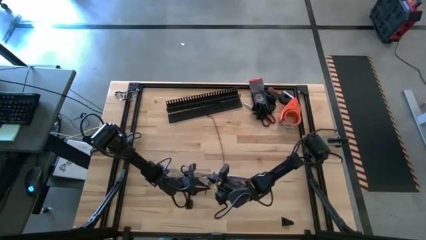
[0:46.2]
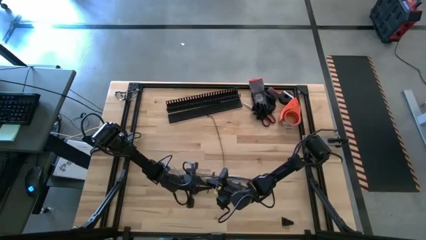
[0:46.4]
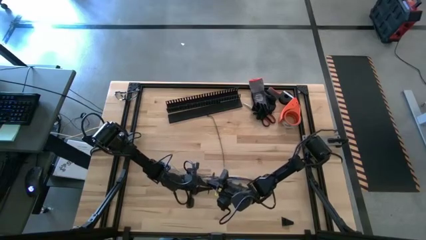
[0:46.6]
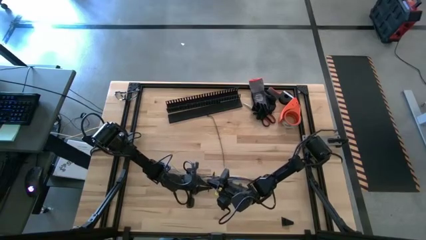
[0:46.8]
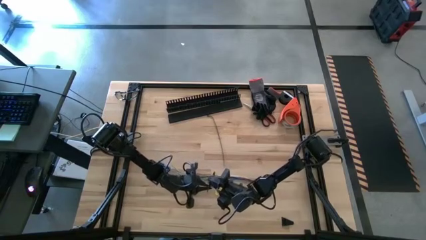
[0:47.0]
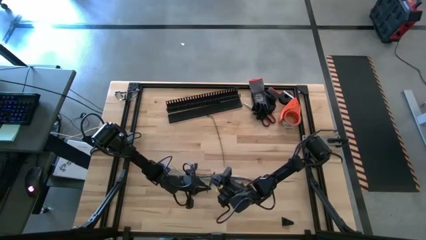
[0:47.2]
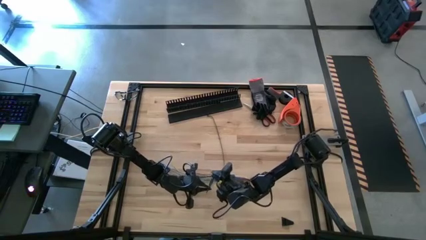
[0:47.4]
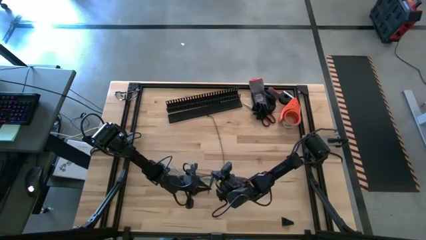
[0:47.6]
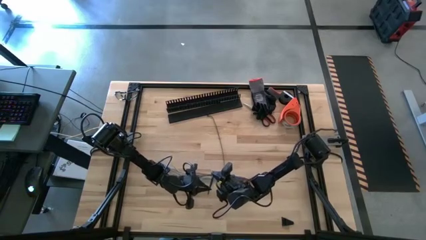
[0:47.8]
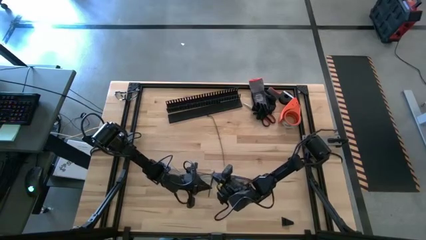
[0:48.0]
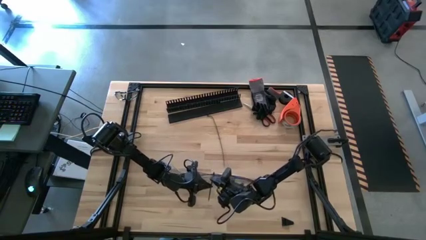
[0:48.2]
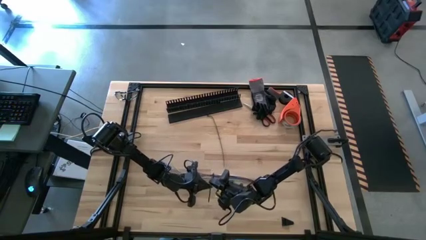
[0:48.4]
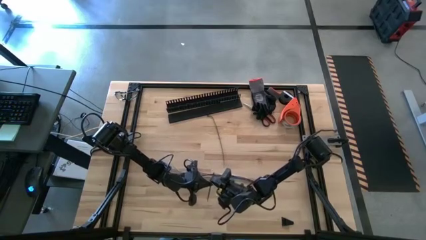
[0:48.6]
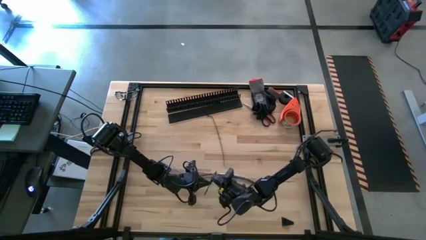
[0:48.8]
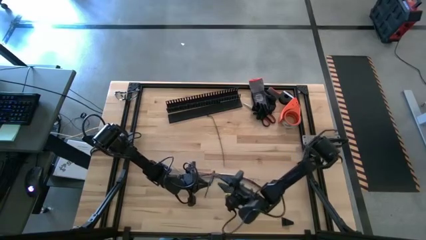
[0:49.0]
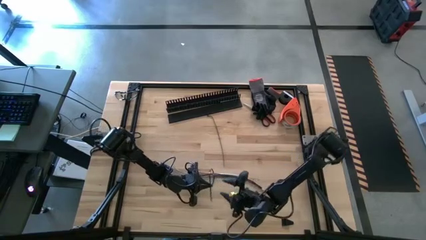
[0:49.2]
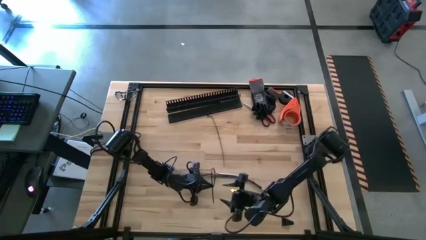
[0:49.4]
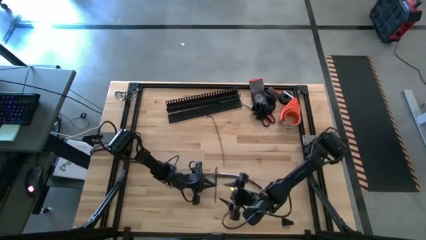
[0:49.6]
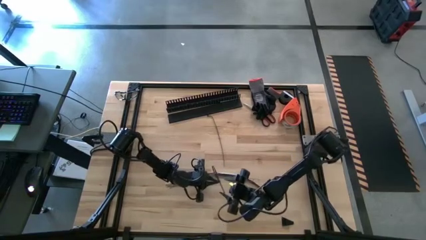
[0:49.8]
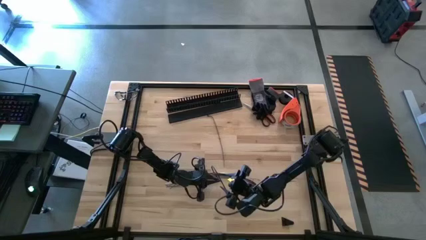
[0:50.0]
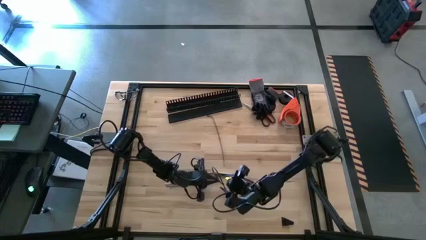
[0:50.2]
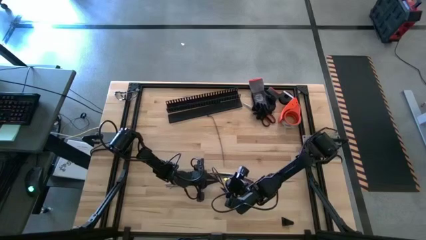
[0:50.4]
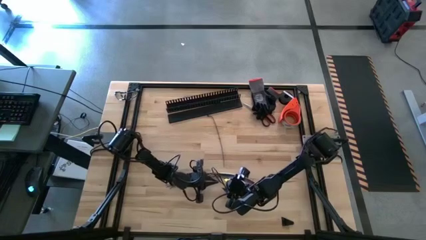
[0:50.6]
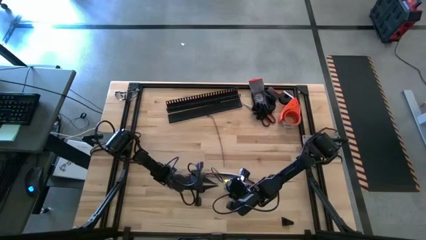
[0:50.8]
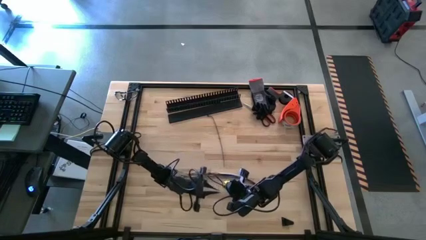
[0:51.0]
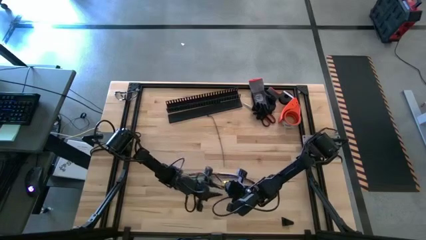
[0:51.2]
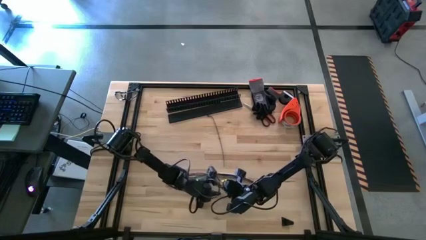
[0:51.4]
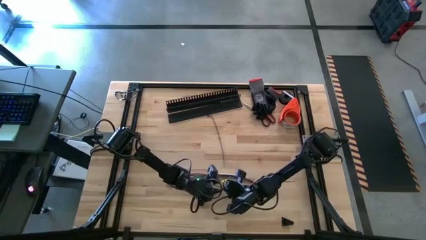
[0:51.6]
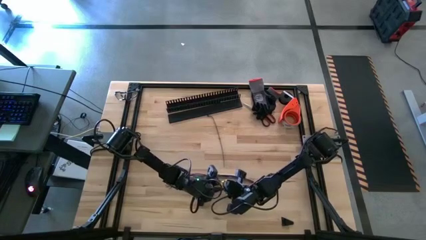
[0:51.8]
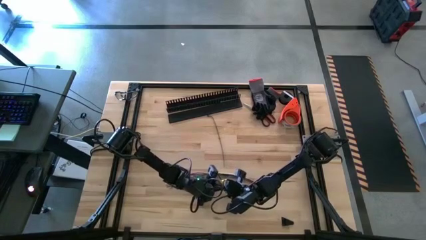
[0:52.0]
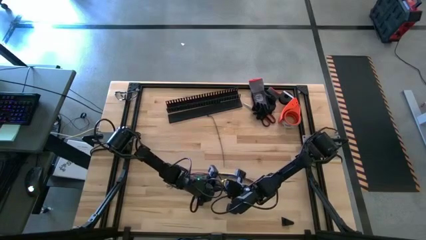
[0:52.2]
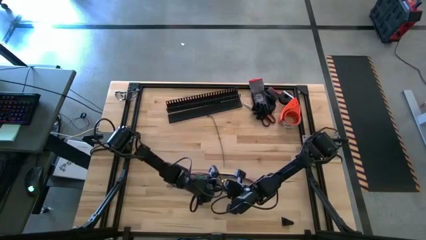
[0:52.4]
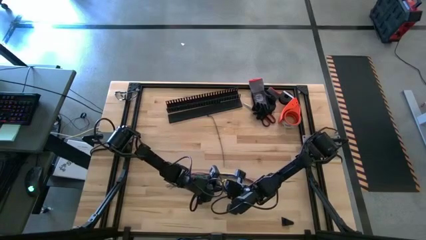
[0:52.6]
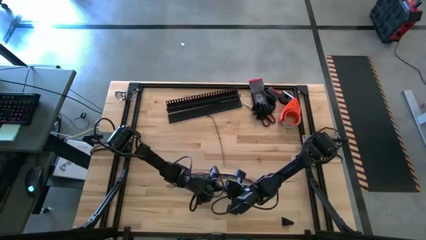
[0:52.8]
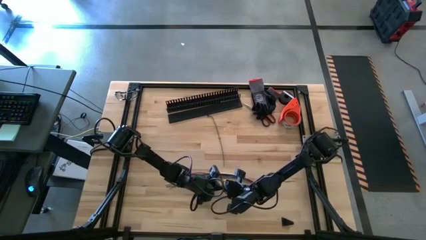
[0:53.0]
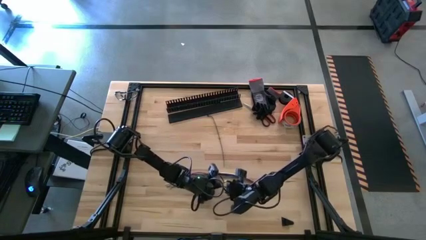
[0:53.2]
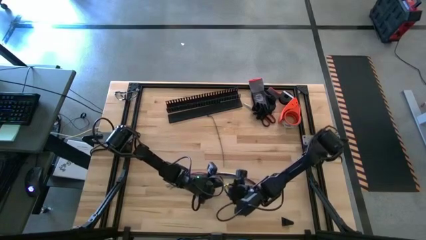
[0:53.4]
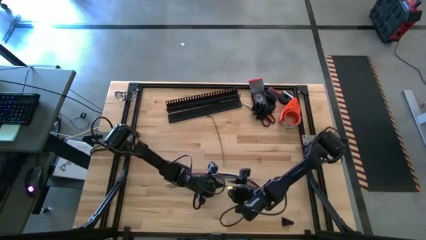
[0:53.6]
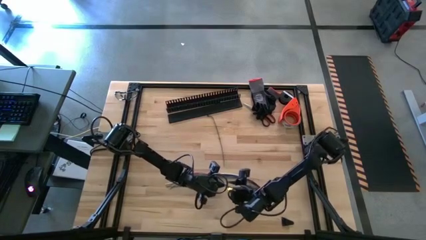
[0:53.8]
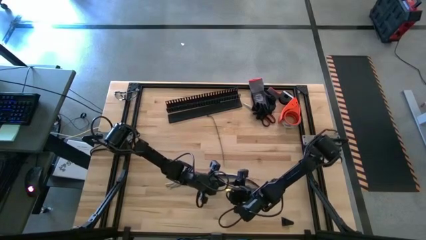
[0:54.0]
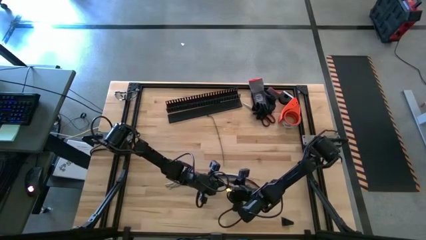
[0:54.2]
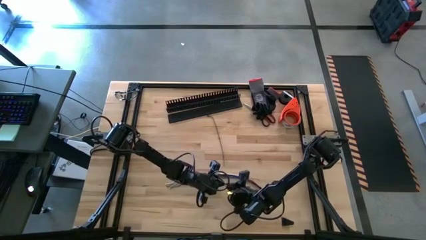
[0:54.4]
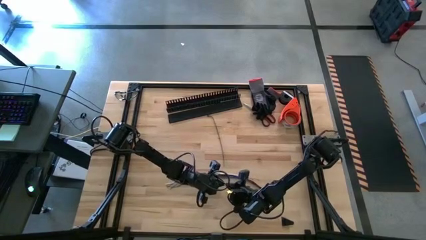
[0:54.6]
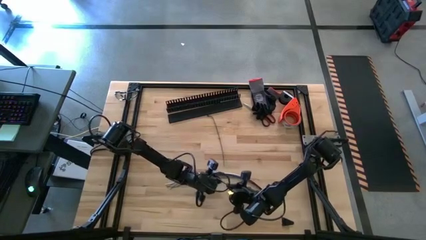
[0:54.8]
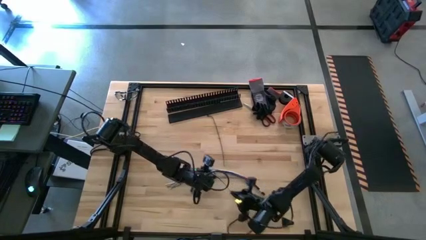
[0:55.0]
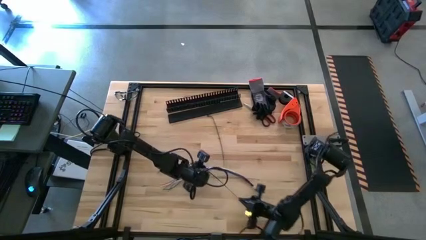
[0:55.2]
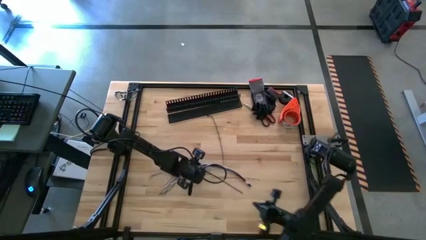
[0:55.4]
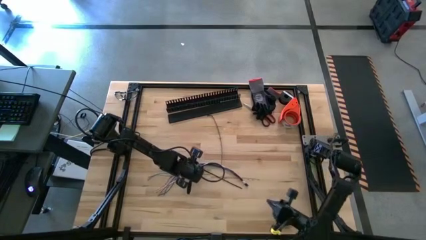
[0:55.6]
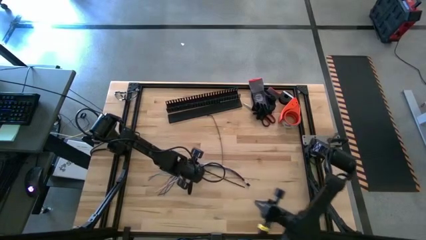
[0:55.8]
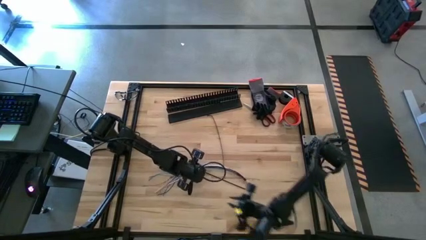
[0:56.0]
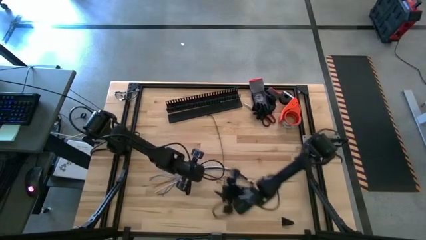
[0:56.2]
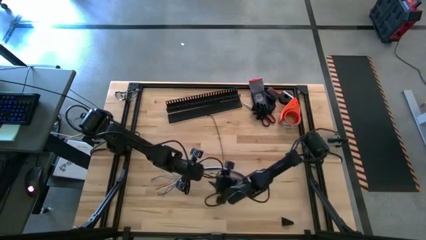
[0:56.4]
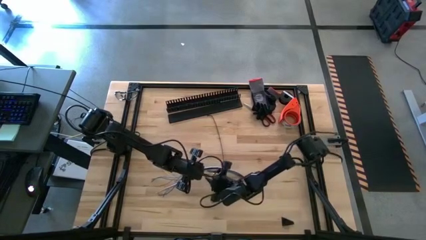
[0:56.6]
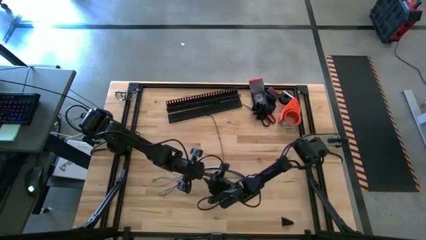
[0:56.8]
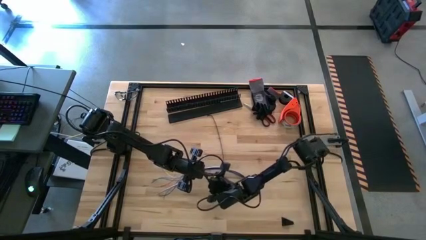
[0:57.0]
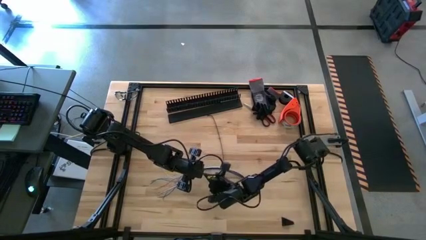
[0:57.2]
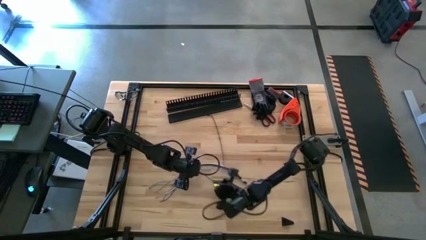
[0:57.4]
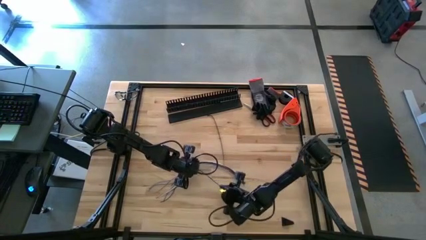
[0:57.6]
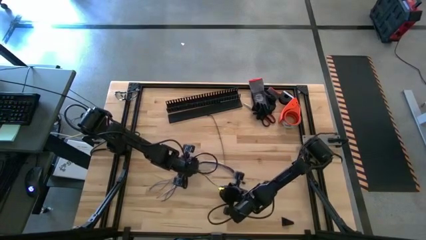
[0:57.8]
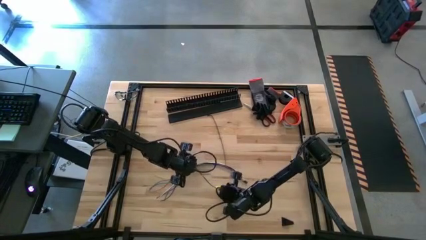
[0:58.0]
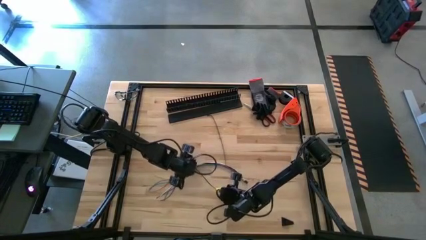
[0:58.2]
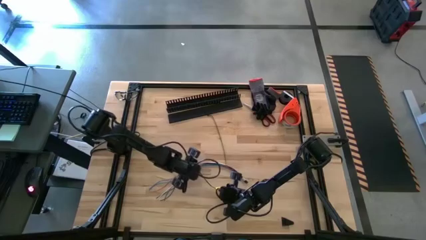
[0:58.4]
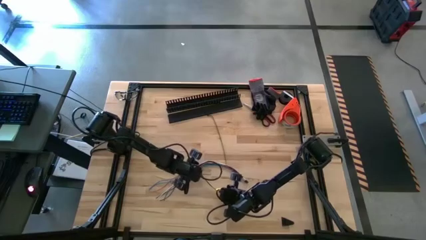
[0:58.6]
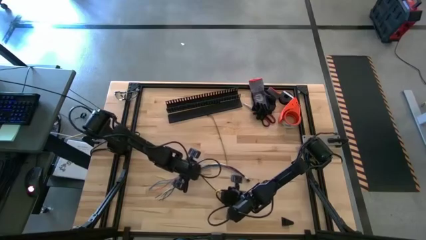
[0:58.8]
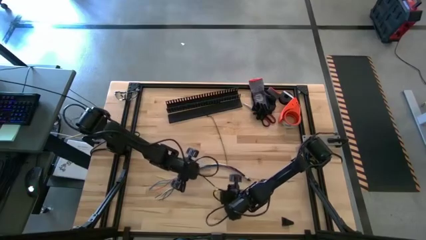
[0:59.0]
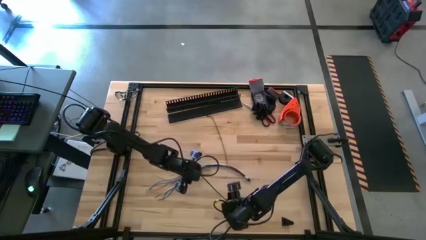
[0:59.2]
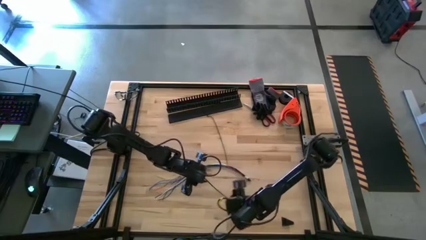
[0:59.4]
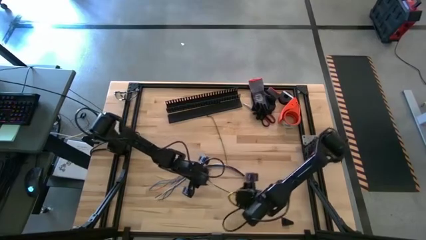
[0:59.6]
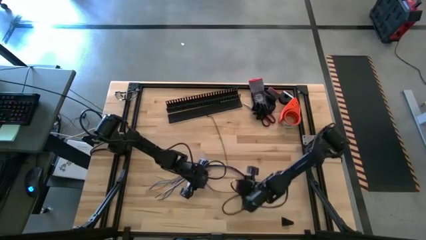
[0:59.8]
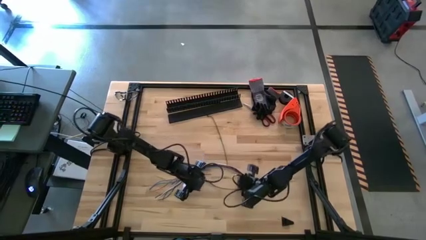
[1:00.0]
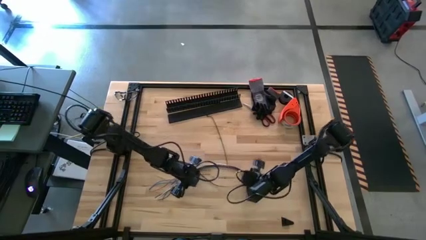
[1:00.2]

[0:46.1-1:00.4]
Task: Ziptie cables
Wrap the top black zip tie around the colored cable bundle
